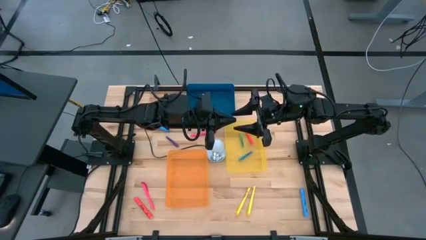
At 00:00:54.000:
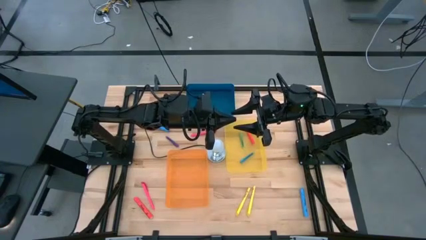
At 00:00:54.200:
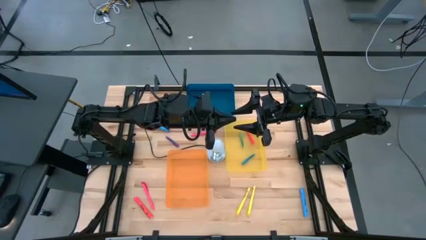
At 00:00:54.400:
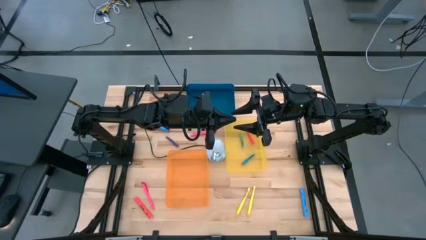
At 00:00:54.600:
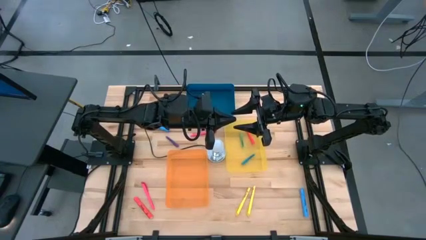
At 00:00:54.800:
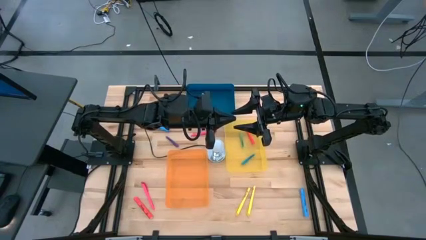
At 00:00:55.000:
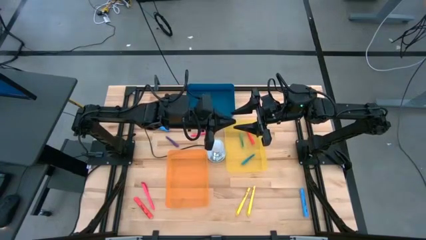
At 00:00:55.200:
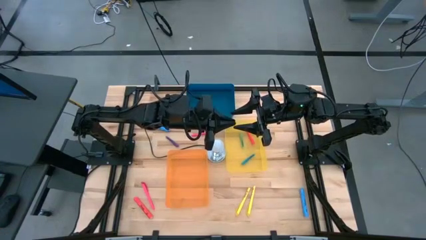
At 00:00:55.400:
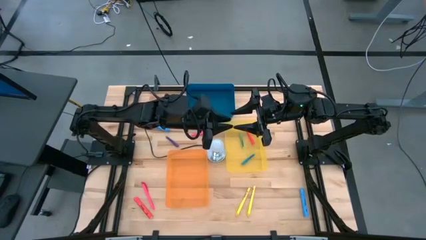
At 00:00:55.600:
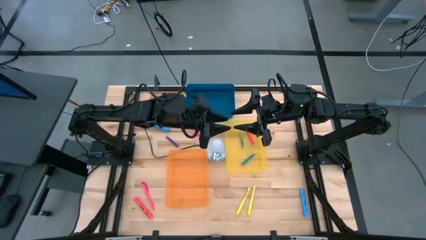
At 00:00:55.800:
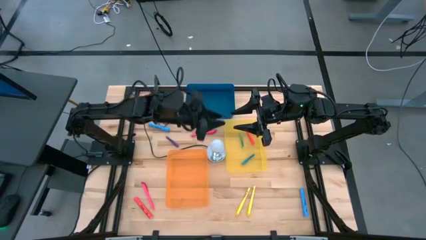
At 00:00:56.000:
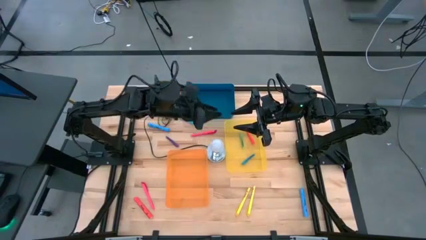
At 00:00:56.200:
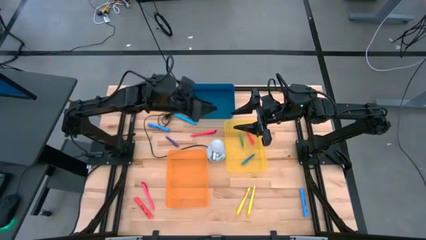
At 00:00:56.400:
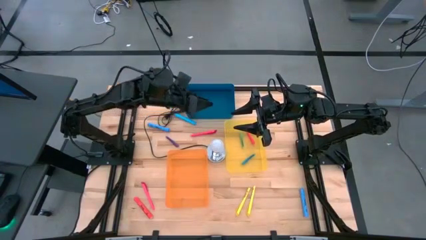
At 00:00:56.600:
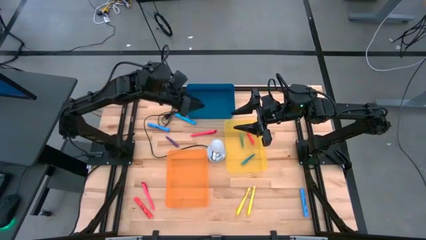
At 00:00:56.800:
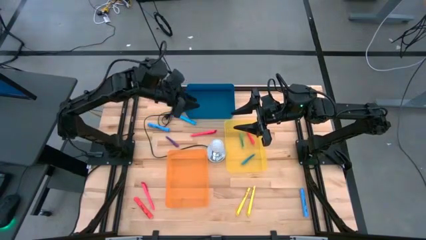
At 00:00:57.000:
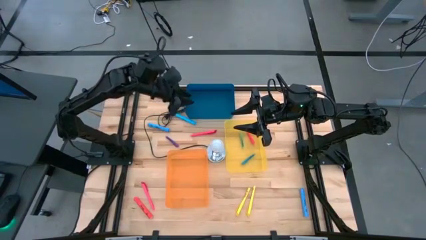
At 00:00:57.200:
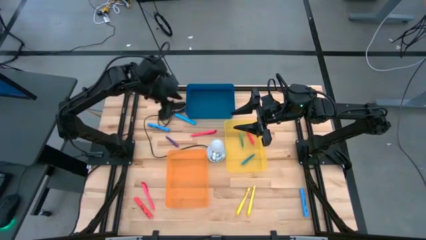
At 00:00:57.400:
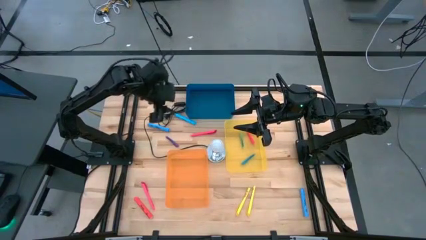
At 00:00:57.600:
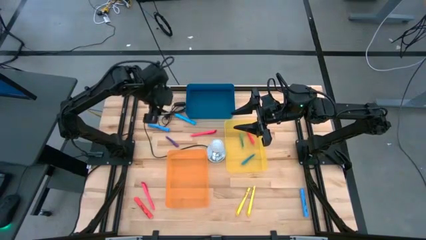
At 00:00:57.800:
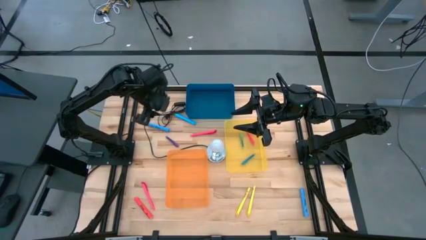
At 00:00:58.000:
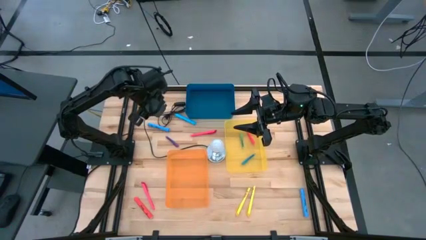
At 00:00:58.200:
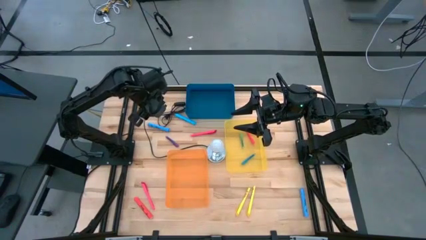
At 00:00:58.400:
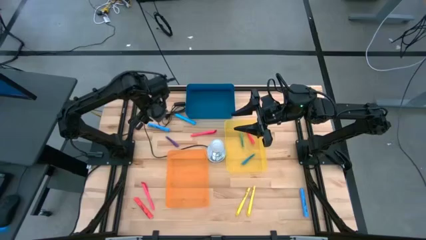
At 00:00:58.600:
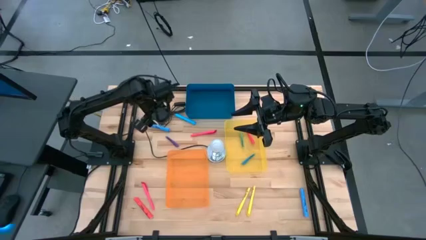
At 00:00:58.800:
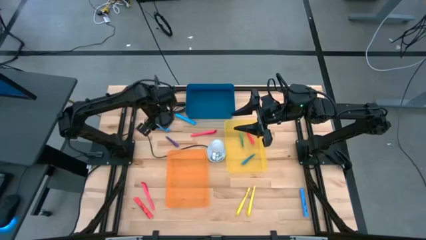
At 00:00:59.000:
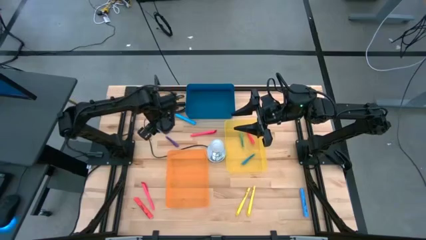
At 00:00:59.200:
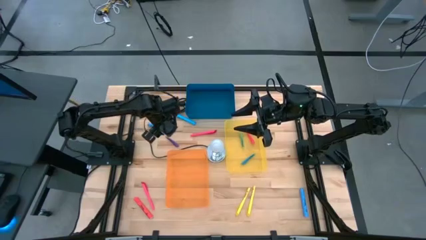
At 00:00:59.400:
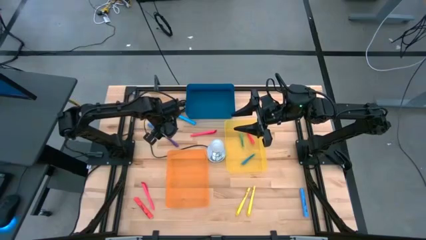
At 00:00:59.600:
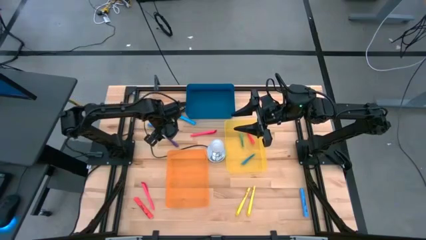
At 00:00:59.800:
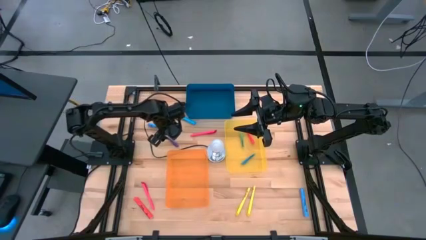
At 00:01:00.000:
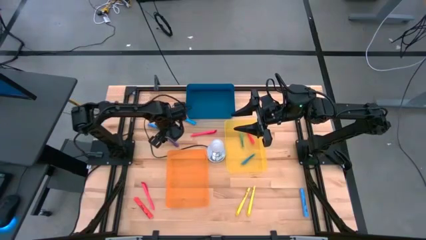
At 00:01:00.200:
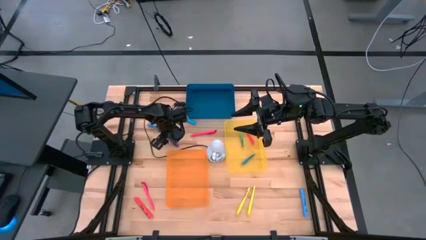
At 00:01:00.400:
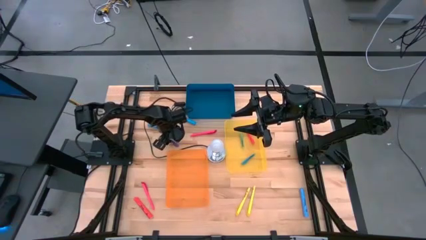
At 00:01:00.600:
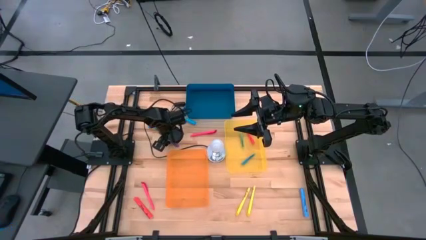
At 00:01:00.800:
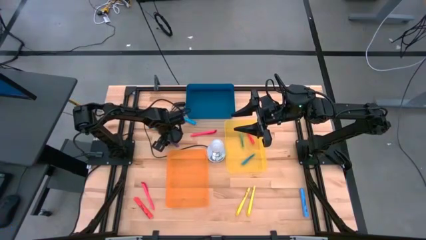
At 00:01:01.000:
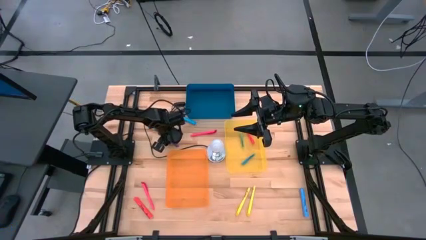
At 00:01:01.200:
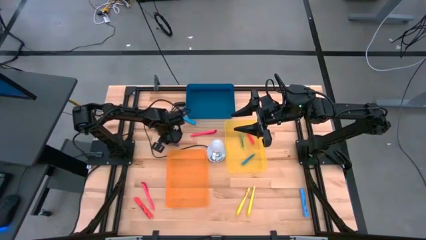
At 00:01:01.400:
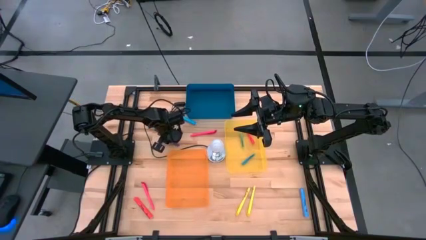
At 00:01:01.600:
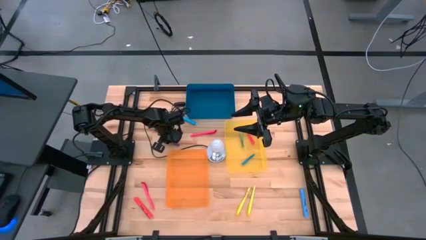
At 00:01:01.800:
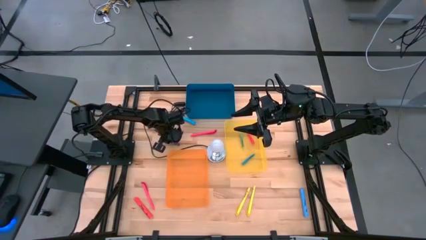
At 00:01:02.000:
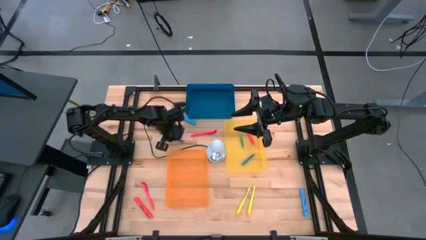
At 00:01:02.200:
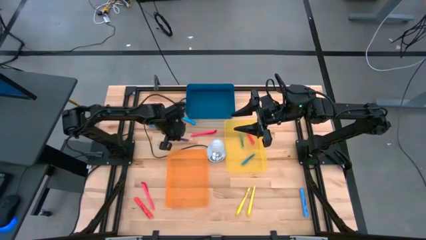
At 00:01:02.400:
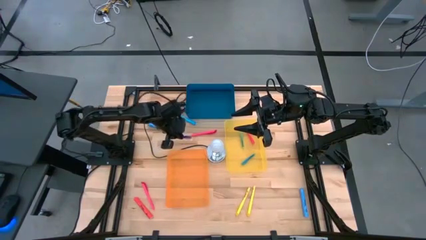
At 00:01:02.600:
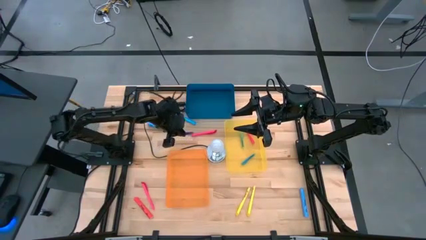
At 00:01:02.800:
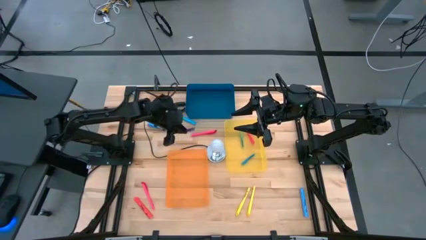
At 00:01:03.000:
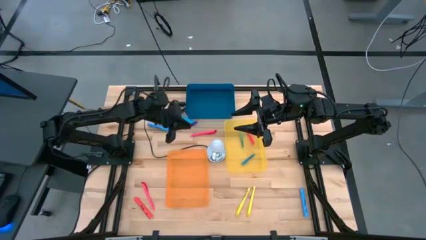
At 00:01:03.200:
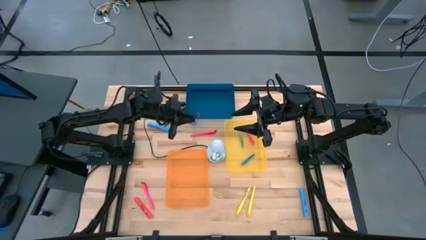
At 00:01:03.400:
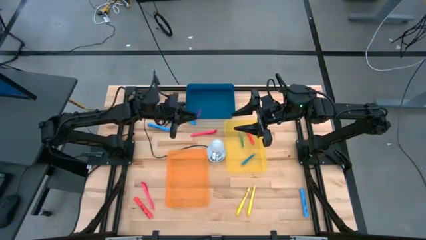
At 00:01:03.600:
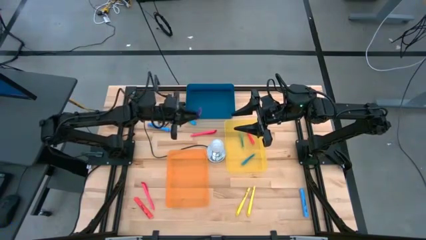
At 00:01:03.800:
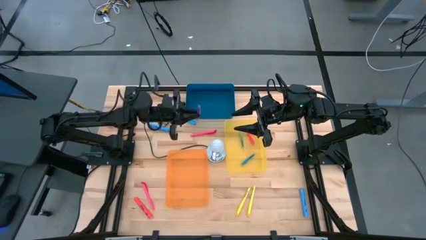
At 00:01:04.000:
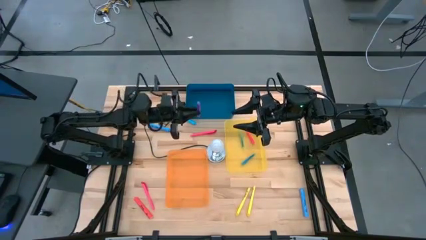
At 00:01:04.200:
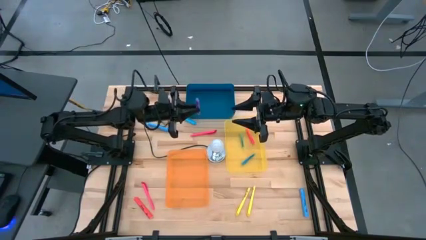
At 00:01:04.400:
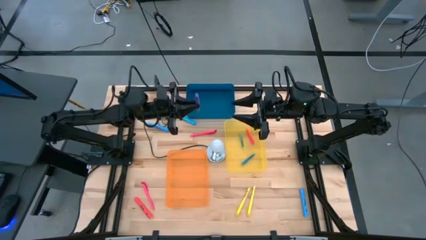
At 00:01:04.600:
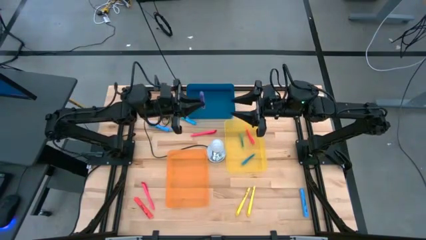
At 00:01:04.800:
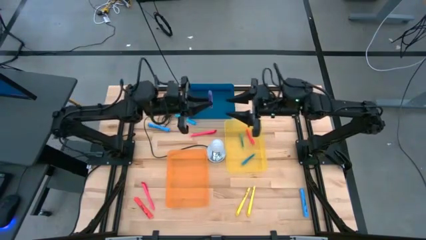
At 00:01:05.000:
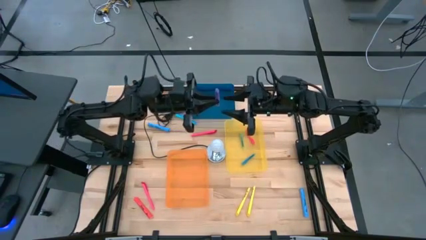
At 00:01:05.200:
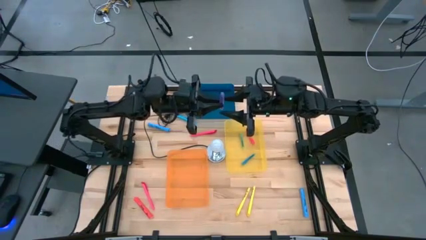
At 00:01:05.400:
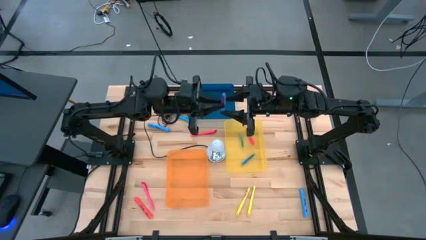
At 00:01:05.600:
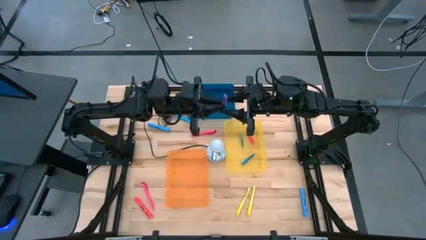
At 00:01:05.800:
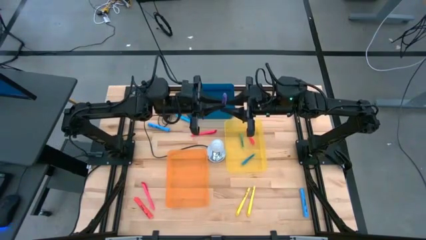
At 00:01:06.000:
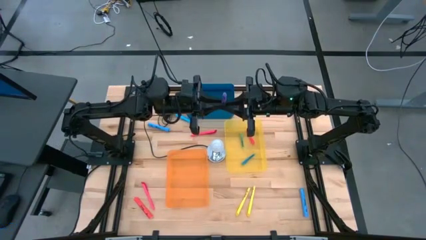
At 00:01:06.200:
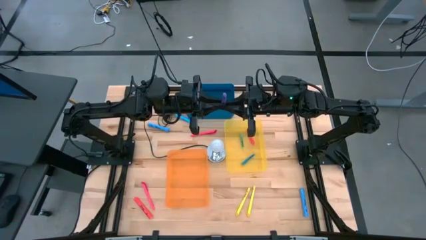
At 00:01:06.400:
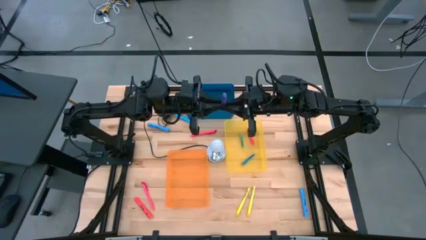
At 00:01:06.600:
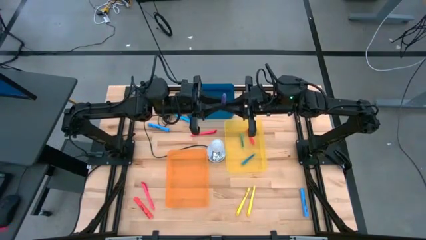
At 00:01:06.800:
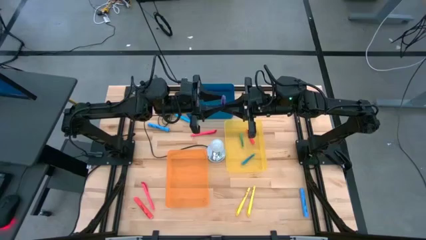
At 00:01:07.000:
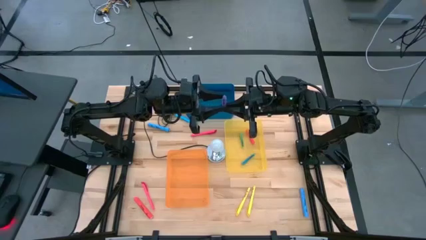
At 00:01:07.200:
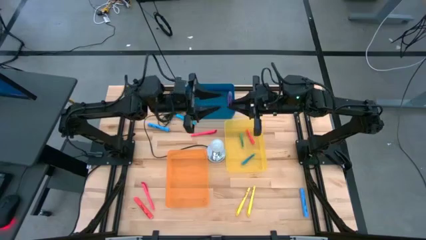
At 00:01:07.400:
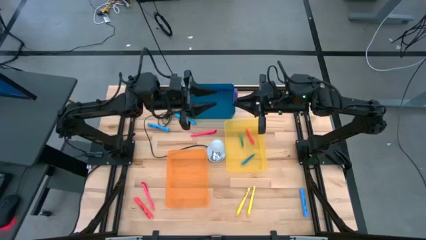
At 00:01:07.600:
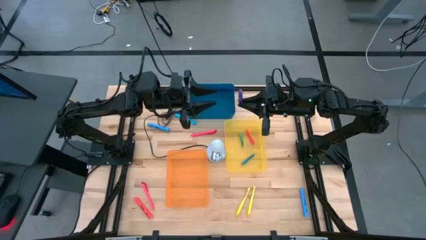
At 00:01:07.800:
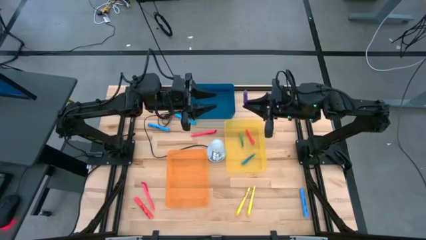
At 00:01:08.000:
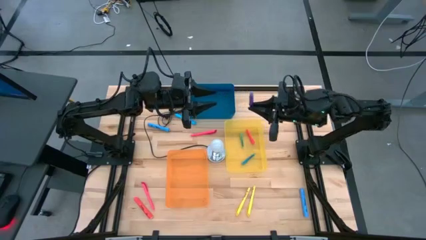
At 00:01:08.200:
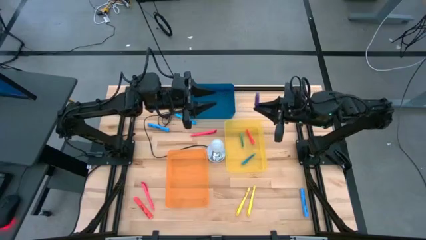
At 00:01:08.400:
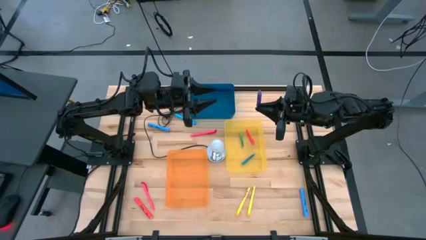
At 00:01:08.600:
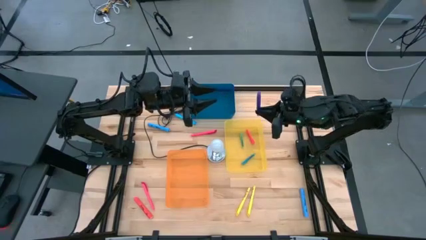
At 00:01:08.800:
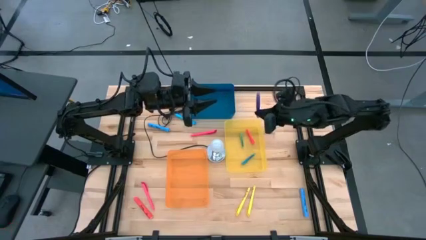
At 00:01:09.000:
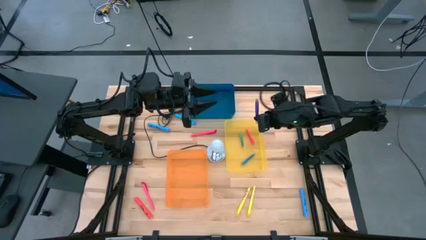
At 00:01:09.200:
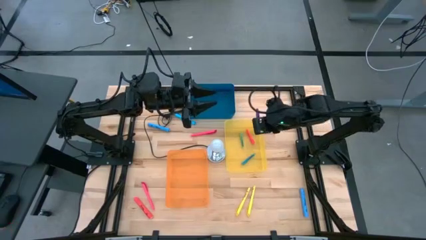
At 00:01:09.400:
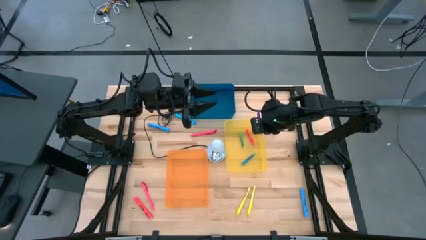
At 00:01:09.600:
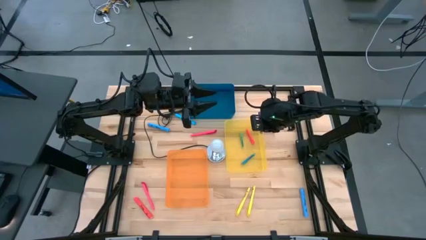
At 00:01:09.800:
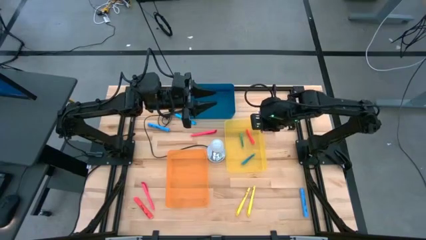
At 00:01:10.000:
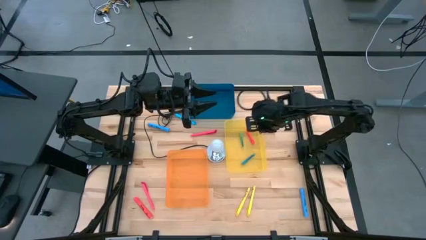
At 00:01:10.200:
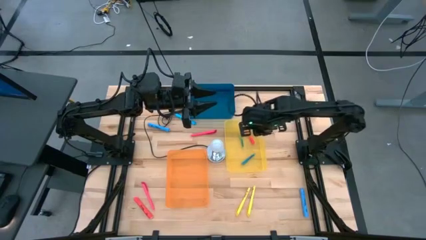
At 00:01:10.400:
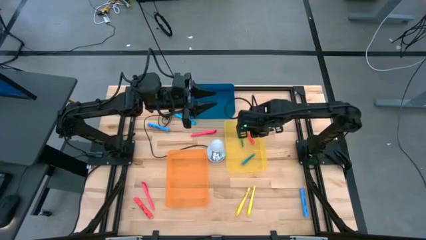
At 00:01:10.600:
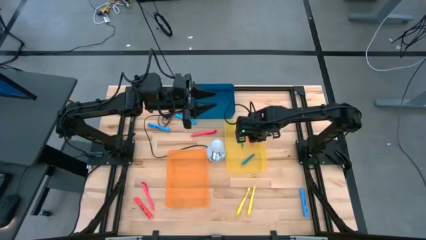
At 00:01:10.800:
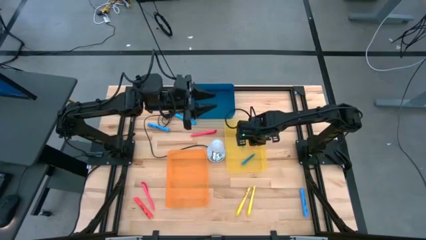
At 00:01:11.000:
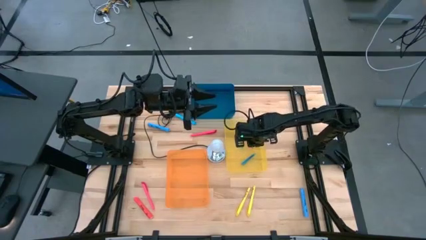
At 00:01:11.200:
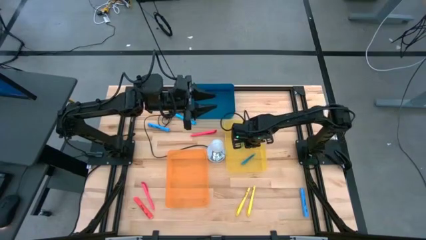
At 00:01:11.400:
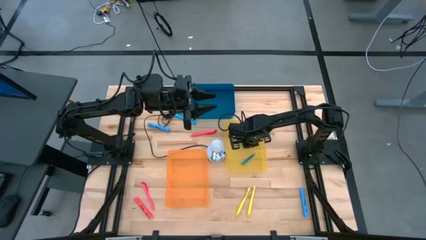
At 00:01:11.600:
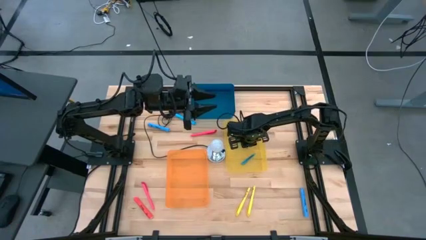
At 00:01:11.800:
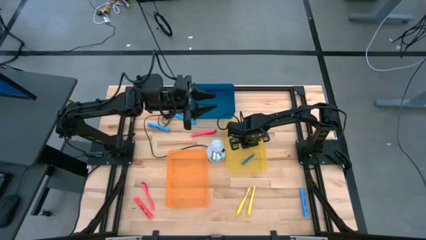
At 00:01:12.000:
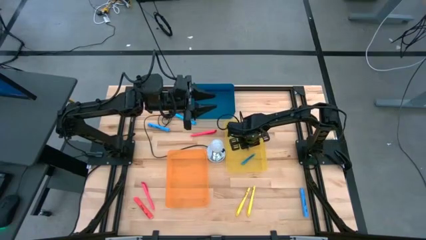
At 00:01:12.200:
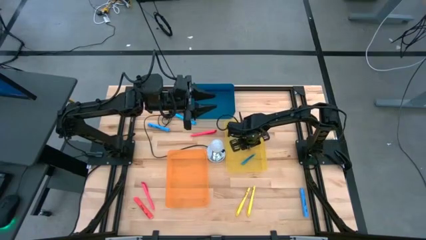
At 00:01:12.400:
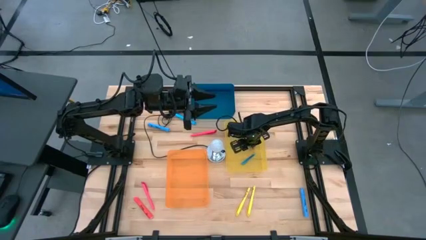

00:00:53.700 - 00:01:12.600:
Task: Pick & Place Markers
Put the small purple pen into the yellow bin
